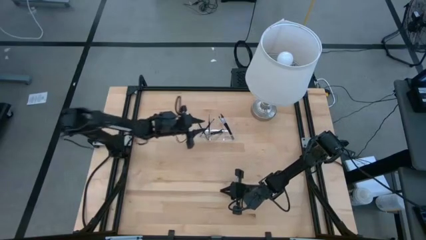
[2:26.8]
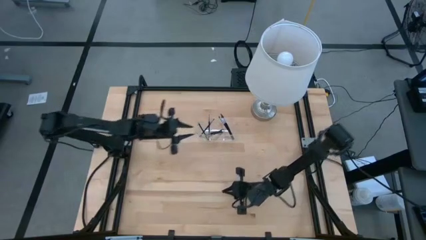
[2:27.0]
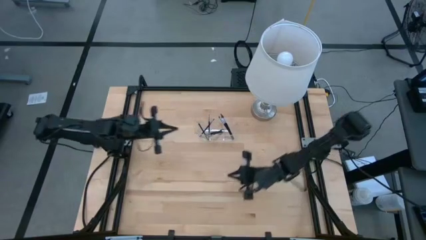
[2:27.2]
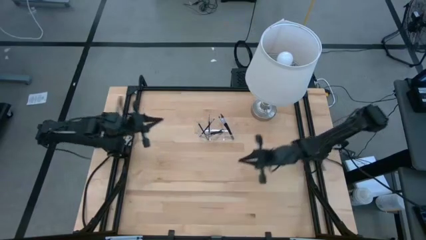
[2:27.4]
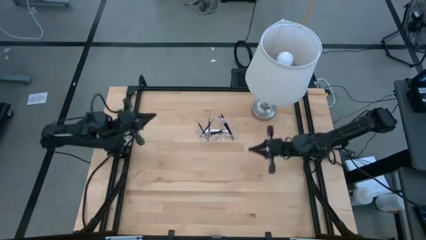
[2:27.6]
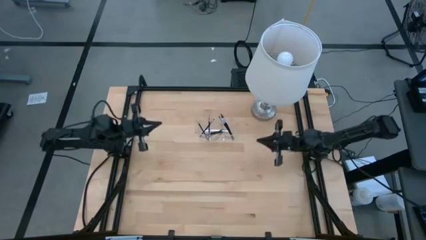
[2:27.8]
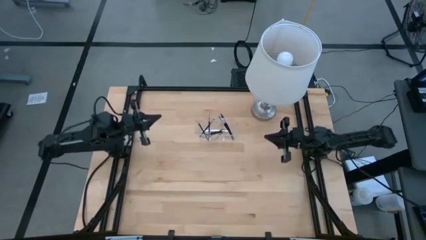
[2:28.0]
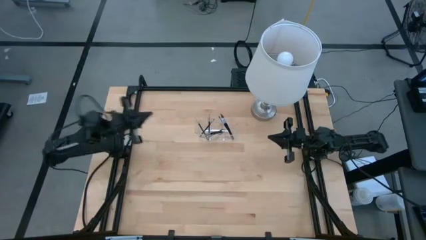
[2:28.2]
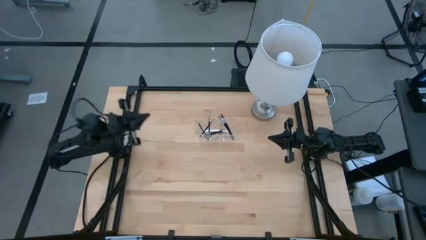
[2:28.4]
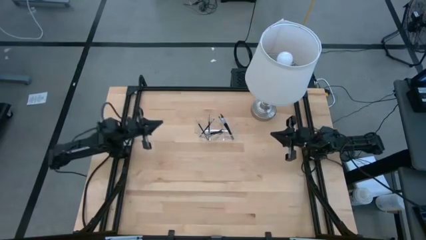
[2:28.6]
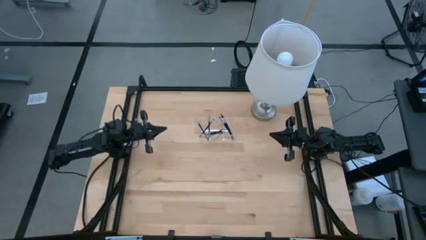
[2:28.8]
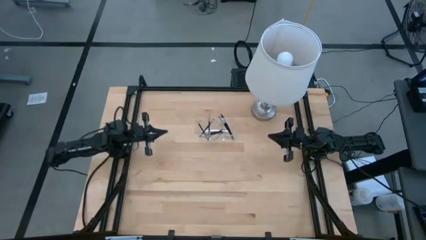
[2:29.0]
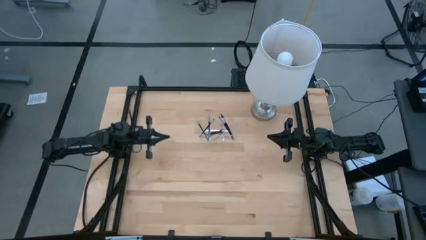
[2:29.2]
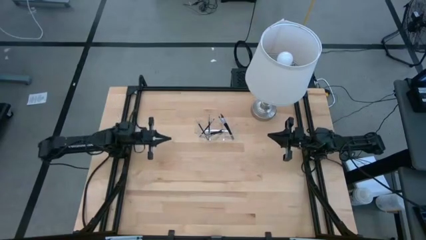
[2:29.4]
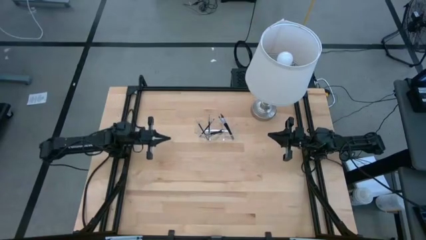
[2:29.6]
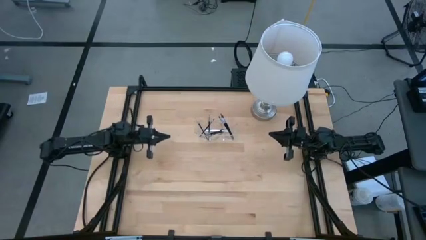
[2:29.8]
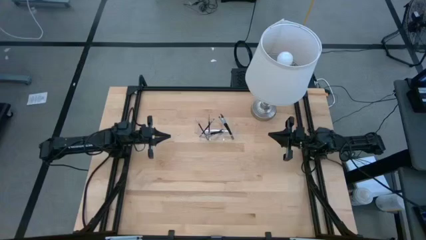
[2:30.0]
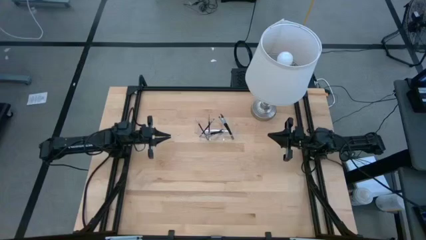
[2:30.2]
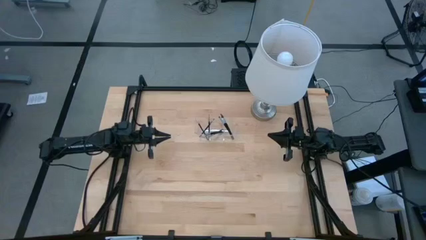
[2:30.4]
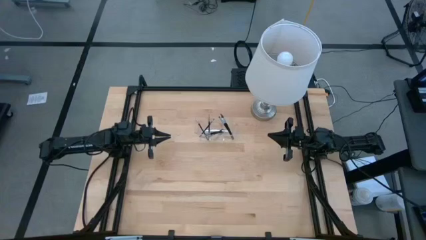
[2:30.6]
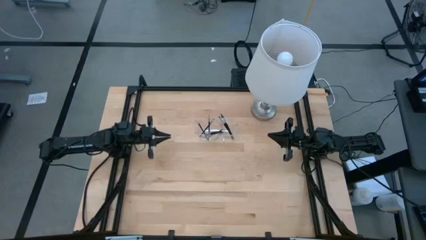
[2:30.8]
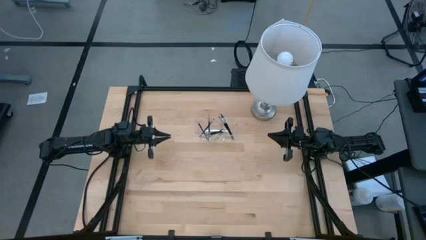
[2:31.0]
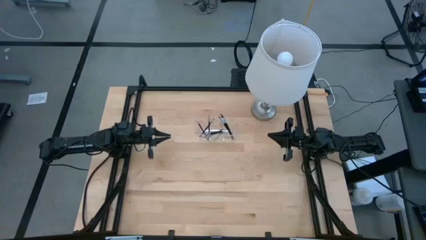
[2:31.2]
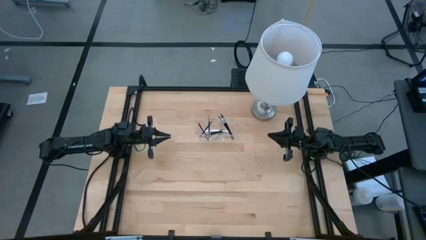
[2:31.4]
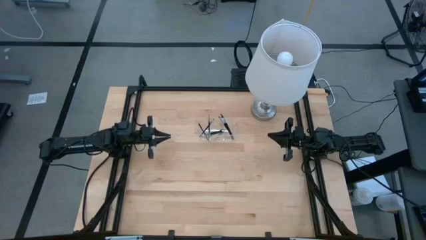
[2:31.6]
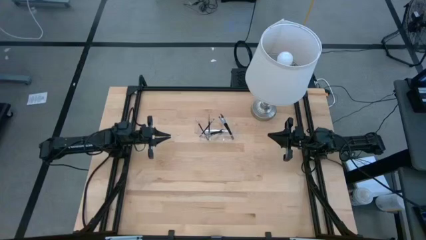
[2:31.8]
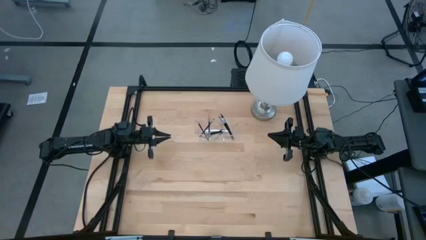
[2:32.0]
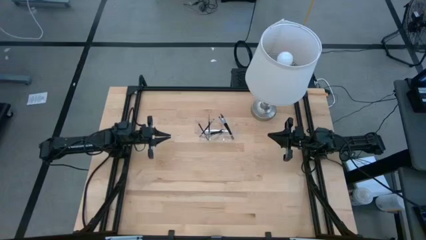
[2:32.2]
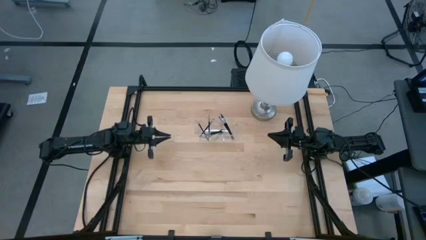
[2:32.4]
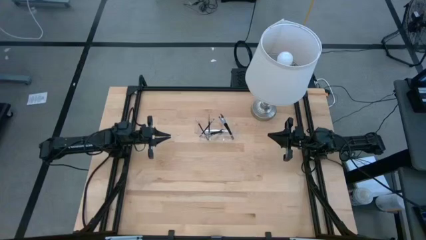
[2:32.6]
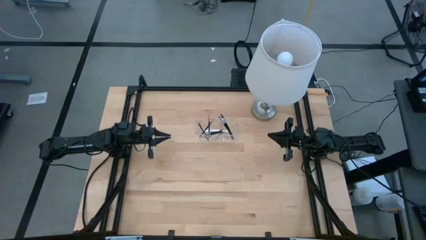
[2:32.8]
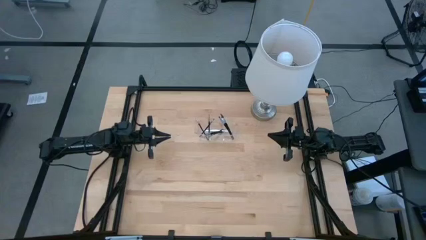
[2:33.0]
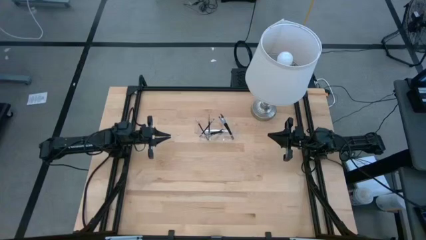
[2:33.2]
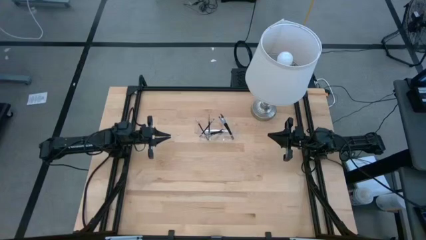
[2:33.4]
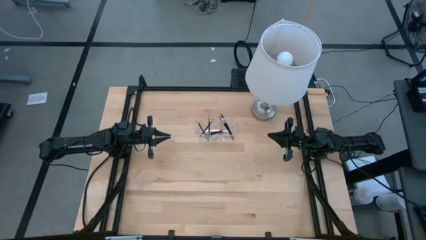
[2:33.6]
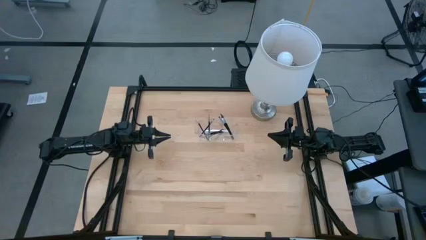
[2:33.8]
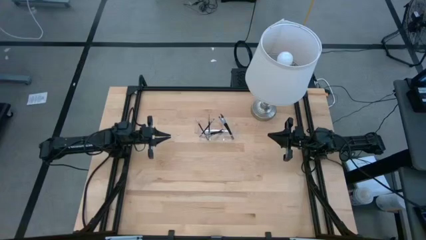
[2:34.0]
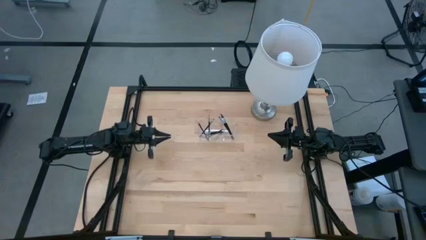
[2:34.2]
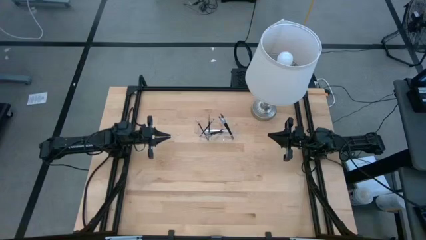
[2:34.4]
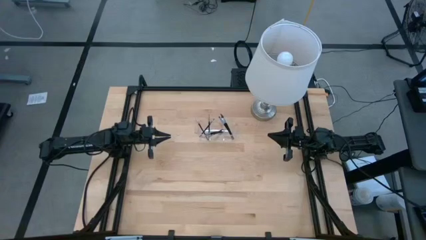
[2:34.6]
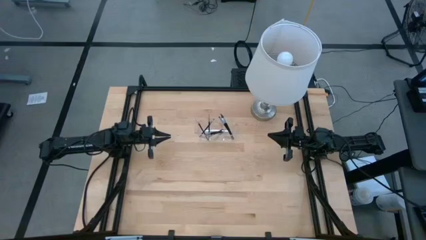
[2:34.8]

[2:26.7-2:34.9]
Task: Put items in baskets/containers
Return to Home Position

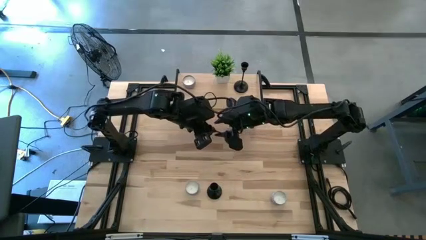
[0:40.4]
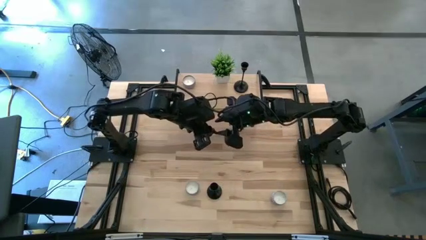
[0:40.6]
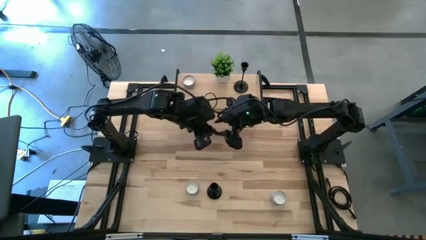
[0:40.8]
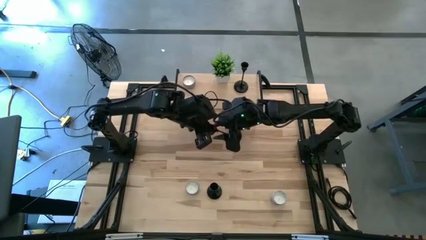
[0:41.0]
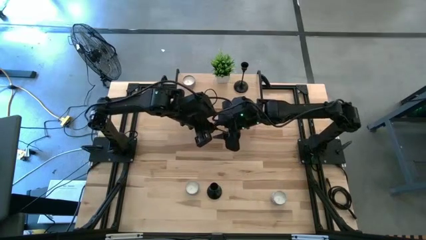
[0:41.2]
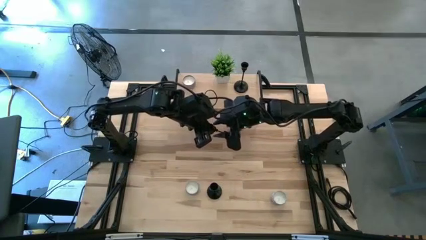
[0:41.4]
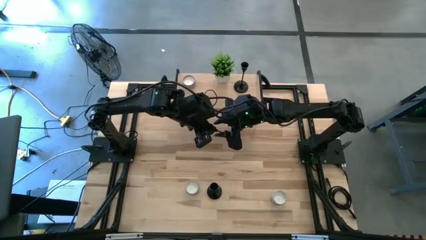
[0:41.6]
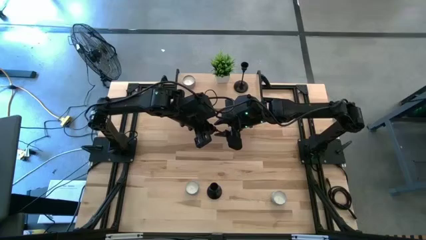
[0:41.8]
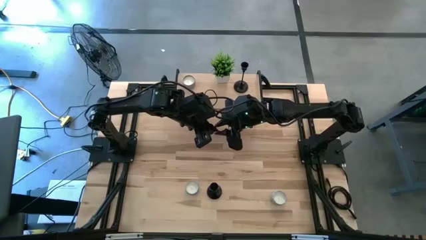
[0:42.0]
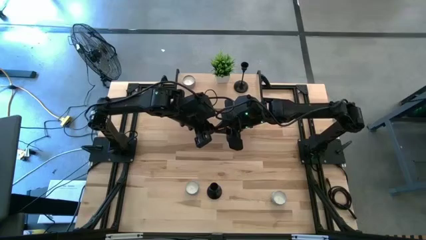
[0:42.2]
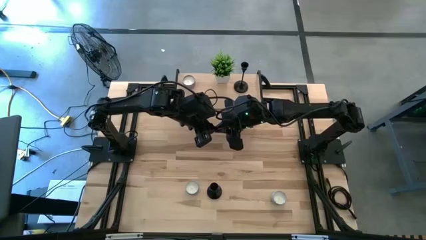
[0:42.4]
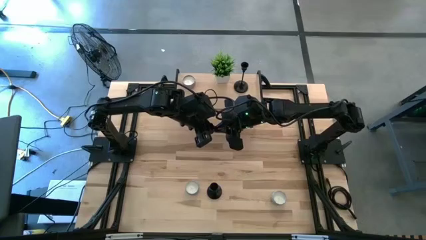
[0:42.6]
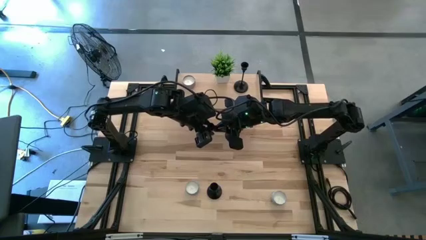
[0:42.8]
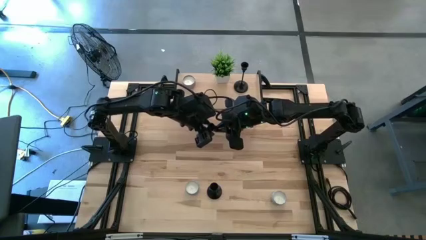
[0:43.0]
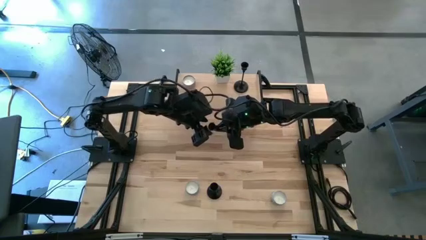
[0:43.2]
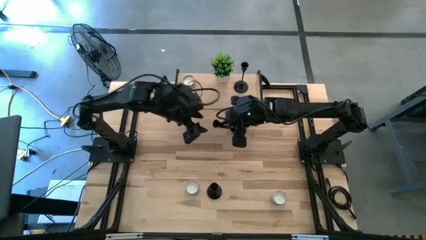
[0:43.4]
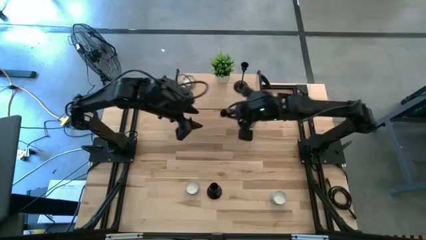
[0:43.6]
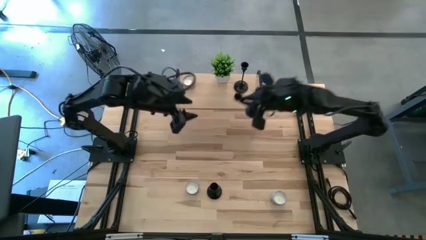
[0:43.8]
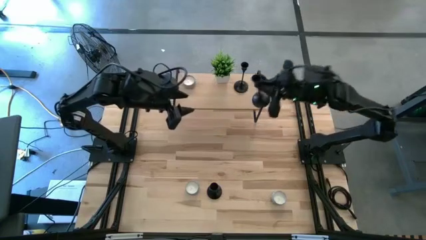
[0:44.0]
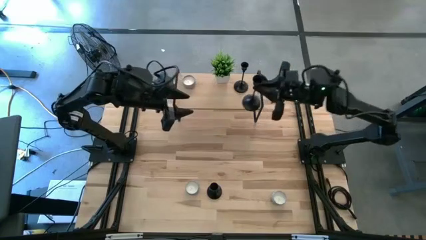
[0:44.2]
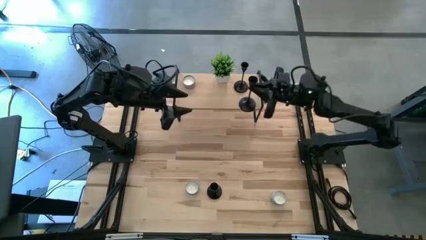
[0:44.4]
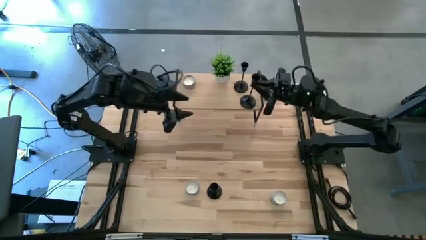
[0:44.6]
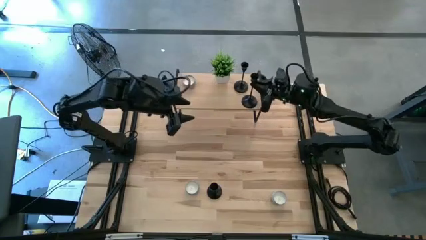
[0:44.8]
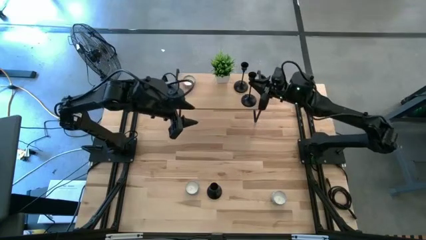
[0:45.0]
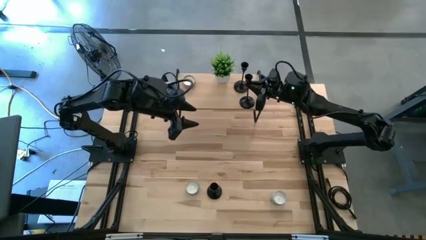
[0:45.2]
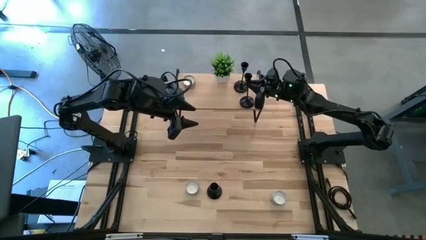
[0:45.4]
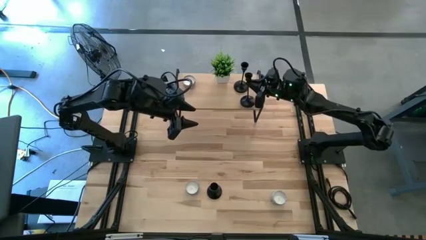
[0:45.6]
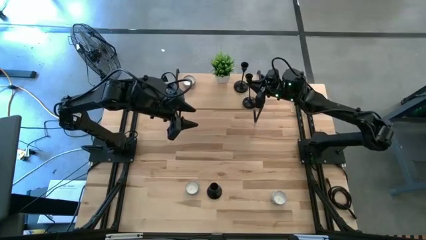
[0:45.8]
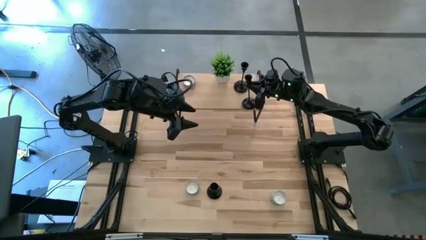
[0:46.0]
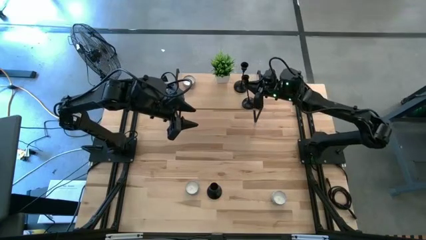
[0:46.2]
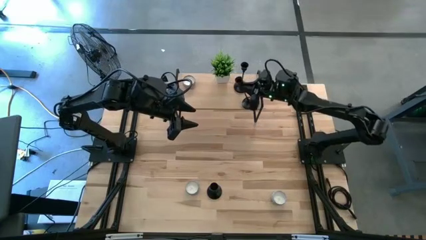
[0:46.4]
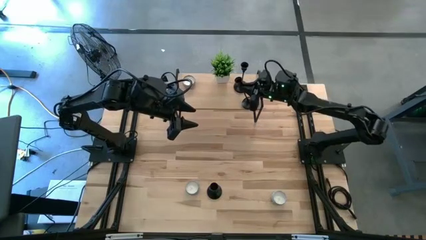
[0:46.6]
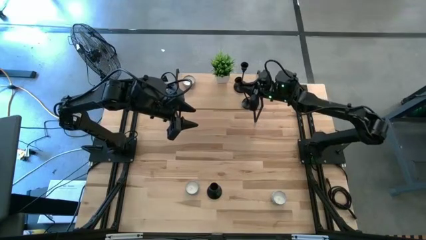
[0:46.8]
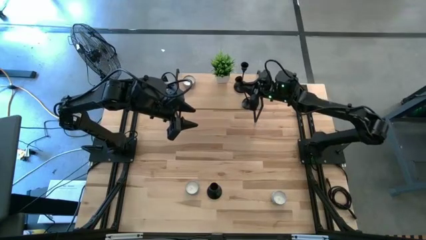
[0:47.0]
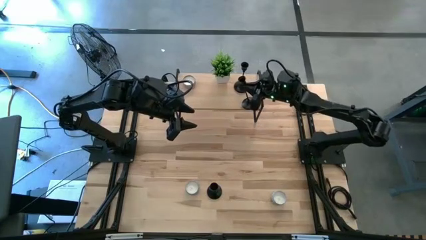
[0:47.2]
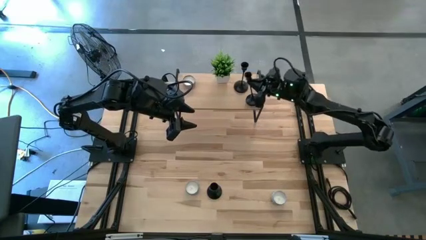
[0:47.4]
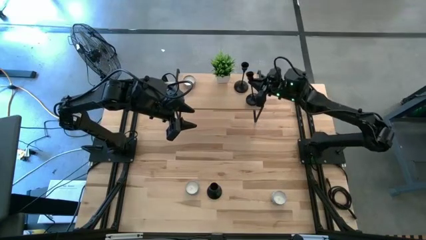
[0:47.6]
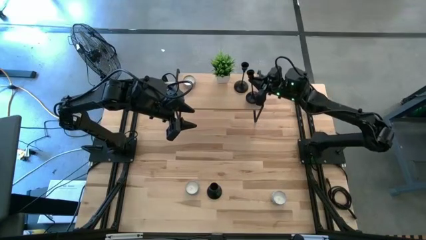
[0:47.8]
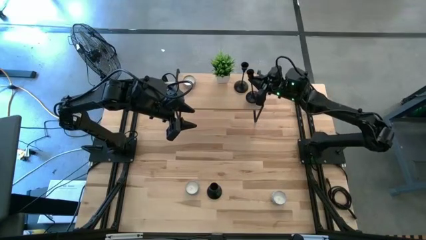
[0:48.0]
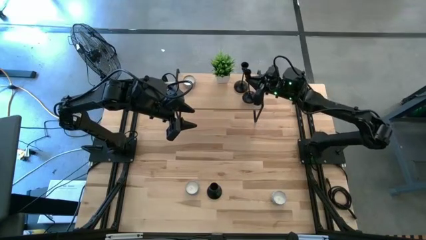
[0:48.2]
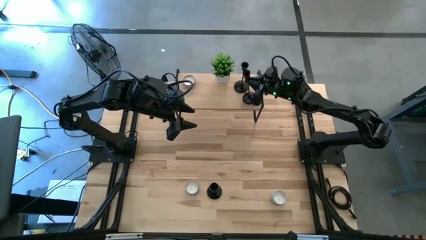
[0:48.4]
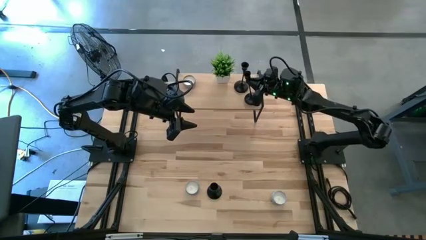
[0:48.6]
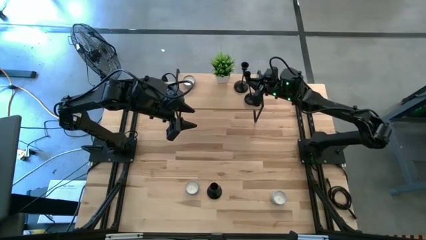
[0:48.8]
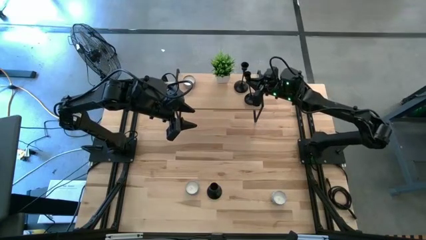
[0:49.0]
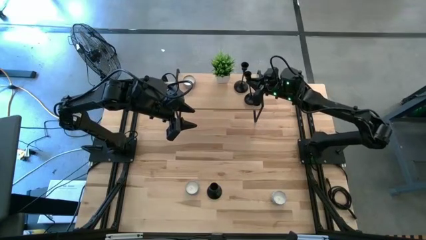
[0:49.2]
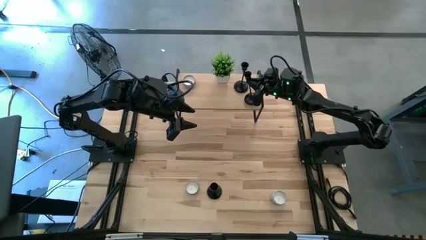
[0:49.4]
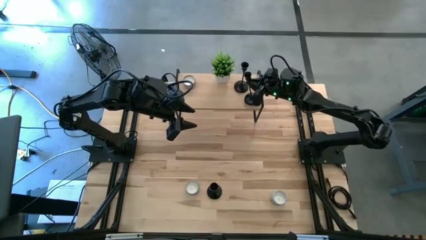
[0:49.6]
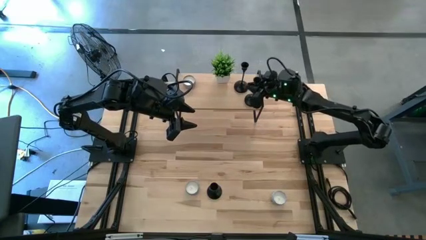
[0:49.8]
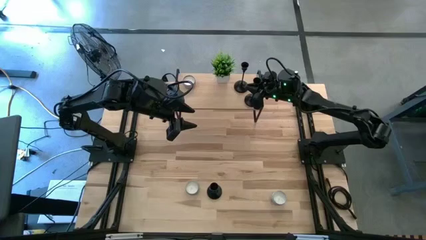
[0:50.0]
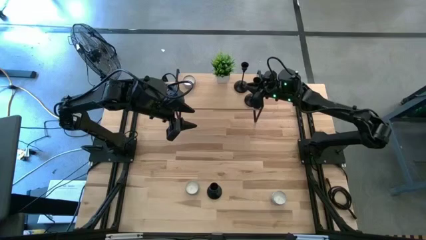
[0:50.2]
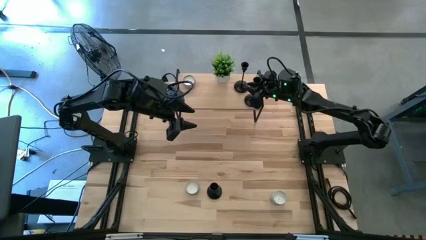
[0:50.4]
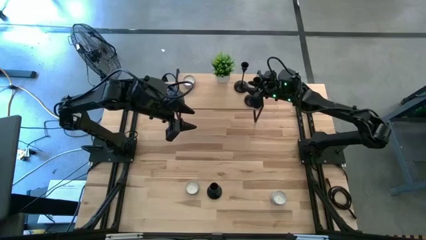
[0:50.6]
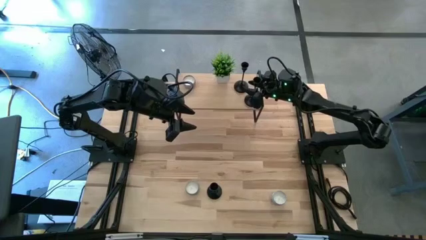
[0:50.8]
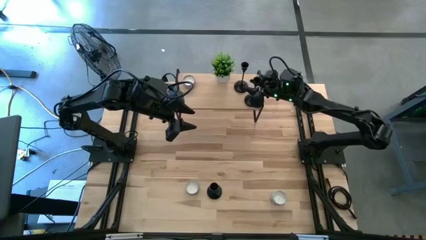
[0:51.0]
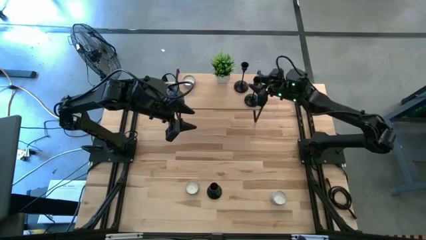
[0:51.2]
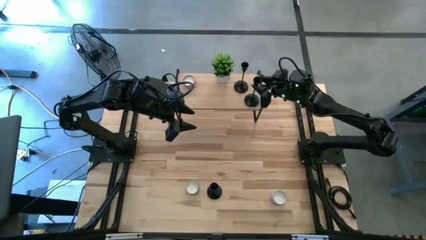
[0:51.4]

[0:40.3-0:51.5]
Task: Pick & Place candle stick holders
Put the left black candle holder on the shelf
